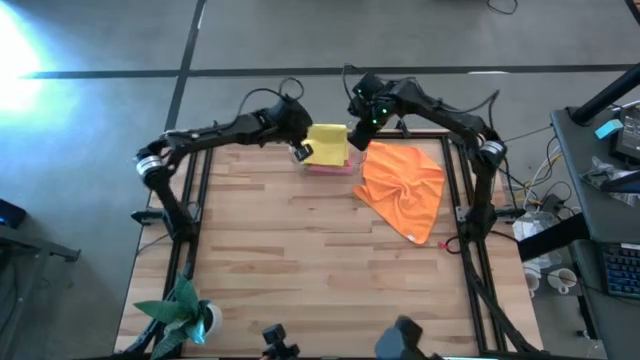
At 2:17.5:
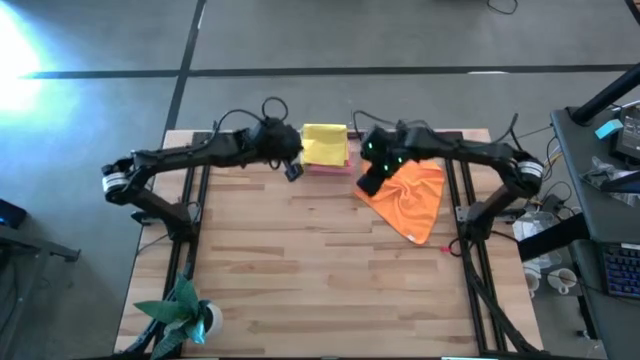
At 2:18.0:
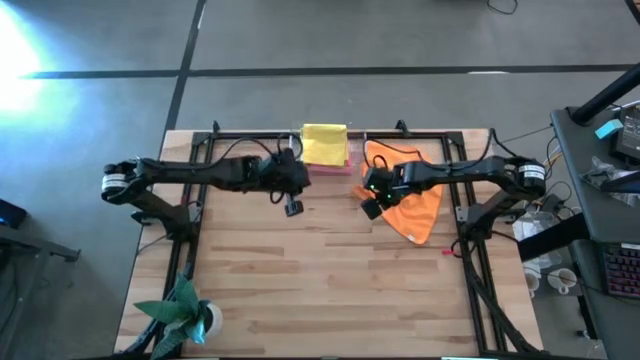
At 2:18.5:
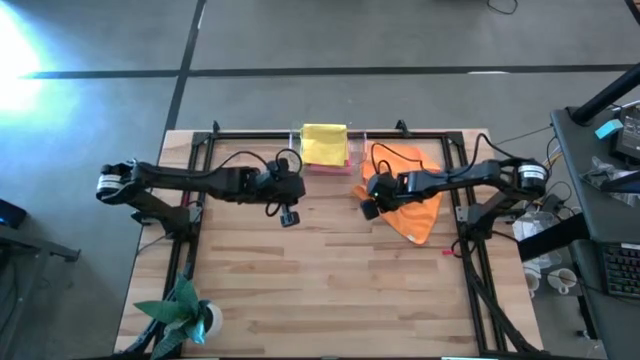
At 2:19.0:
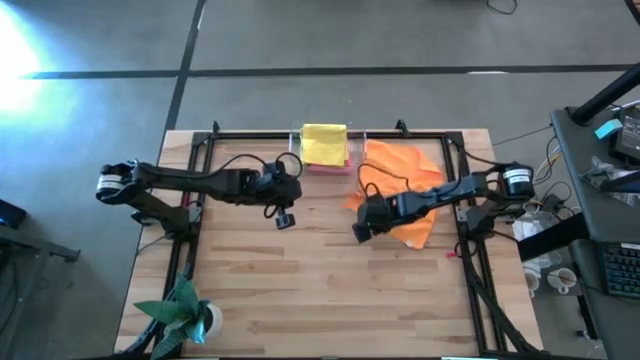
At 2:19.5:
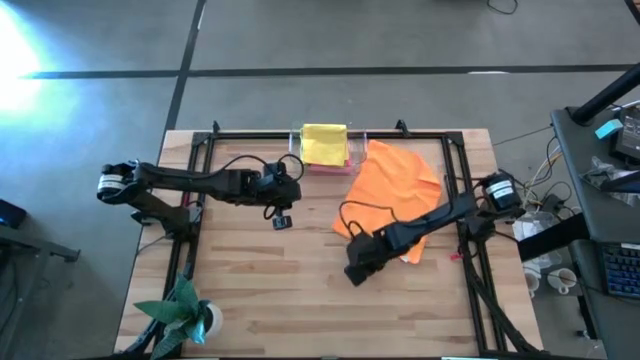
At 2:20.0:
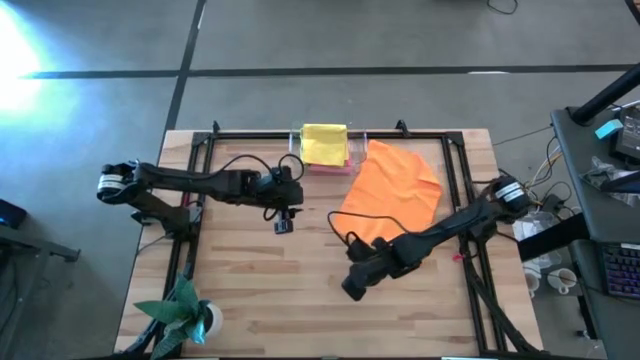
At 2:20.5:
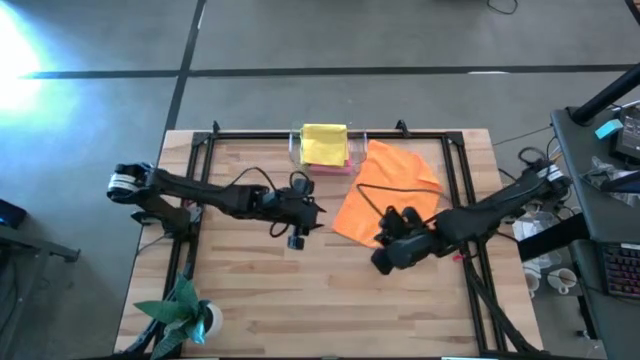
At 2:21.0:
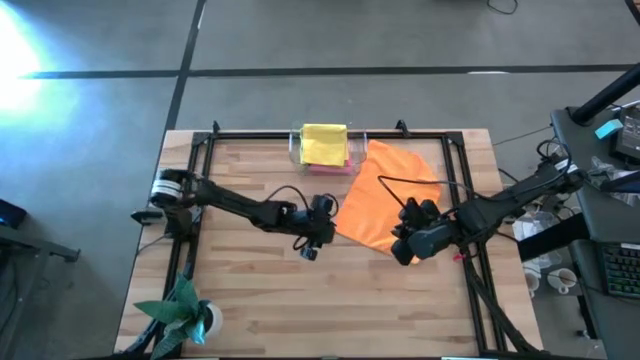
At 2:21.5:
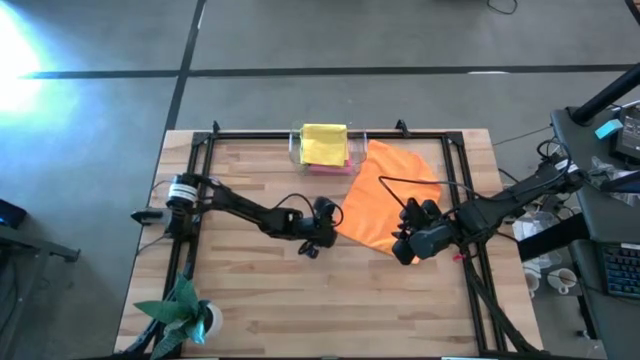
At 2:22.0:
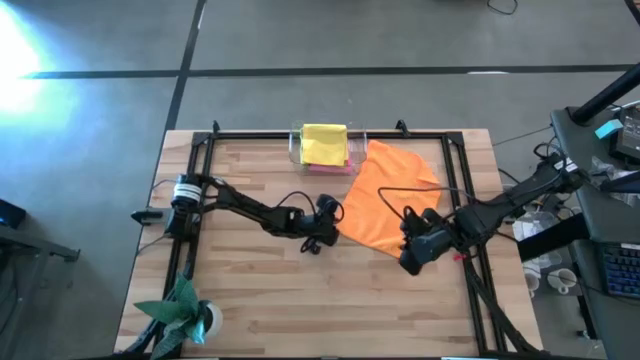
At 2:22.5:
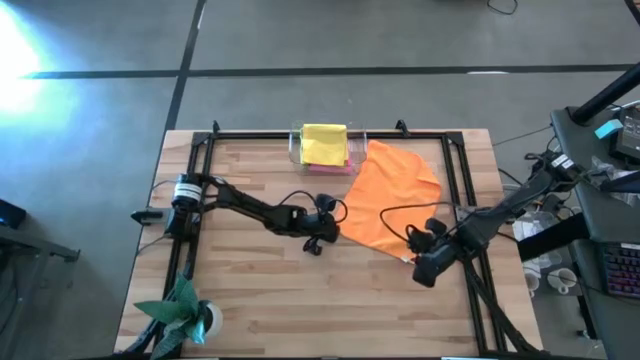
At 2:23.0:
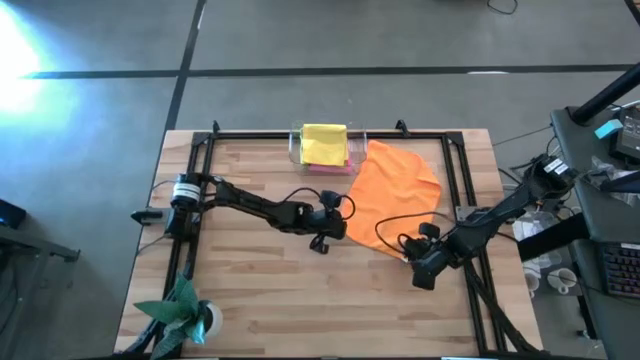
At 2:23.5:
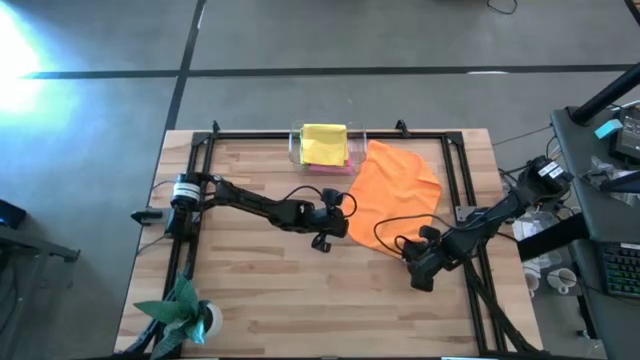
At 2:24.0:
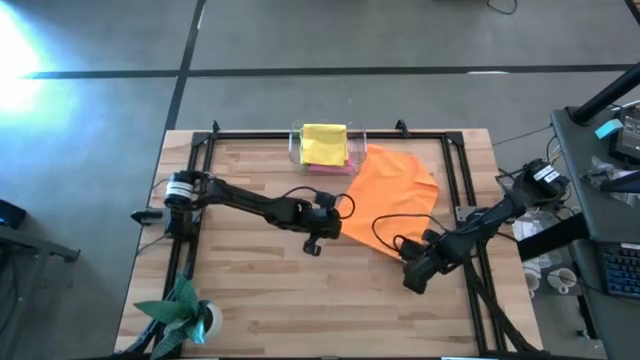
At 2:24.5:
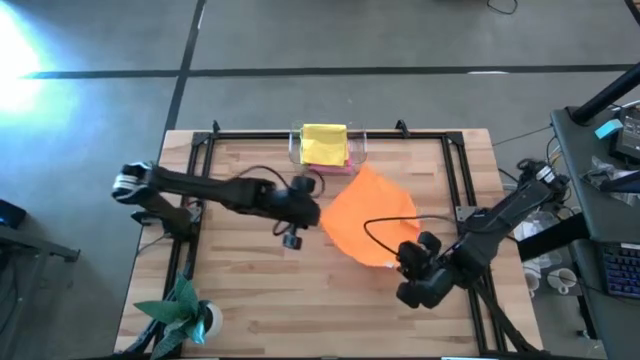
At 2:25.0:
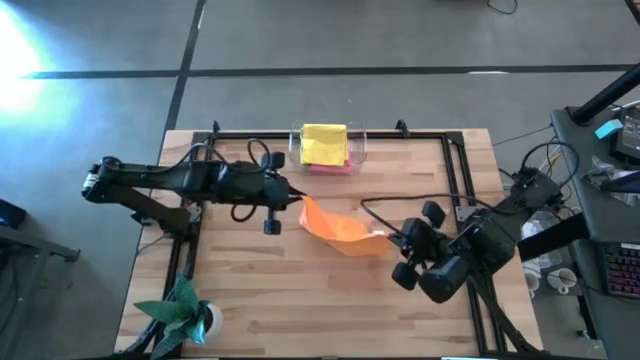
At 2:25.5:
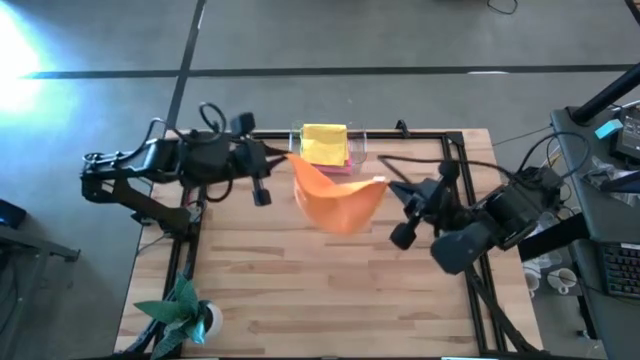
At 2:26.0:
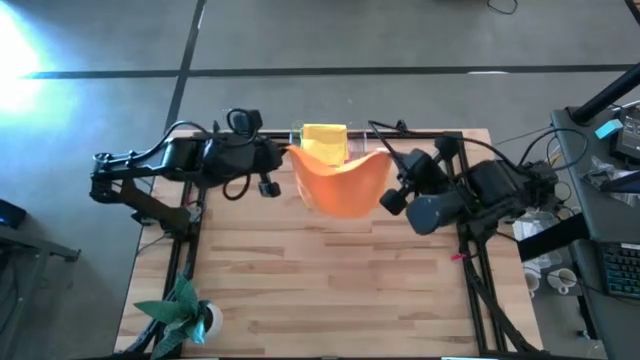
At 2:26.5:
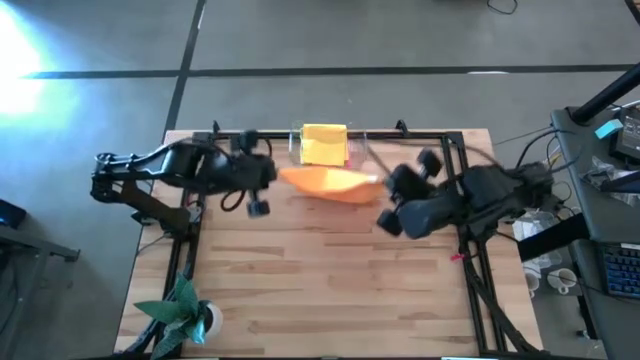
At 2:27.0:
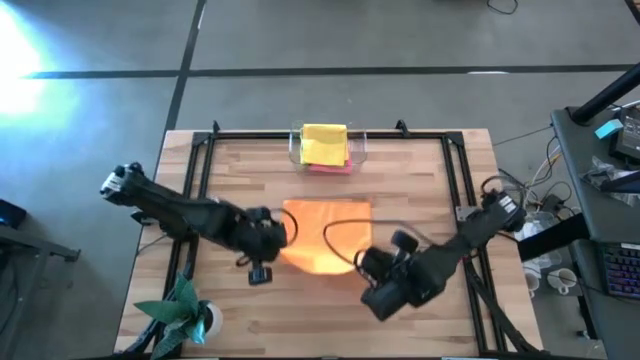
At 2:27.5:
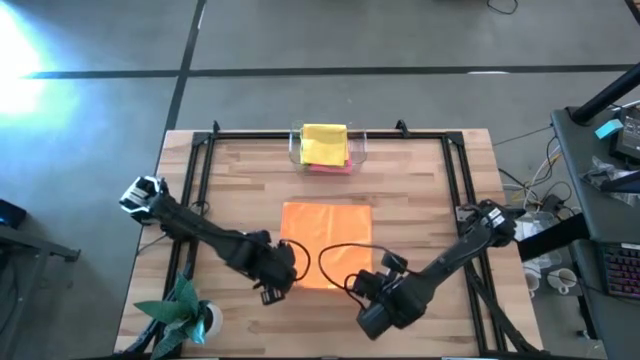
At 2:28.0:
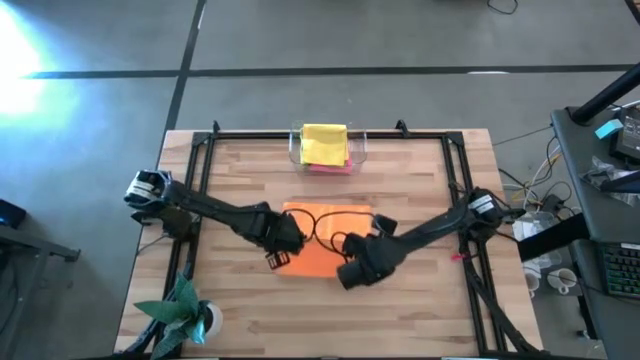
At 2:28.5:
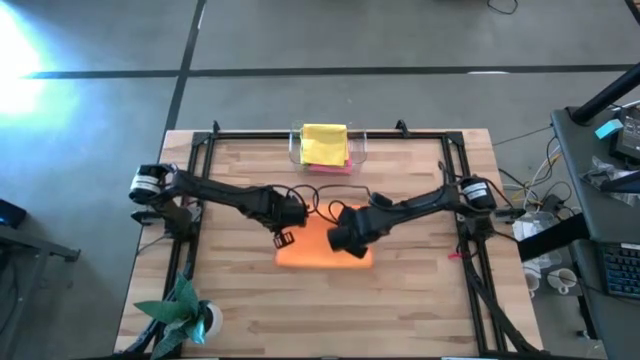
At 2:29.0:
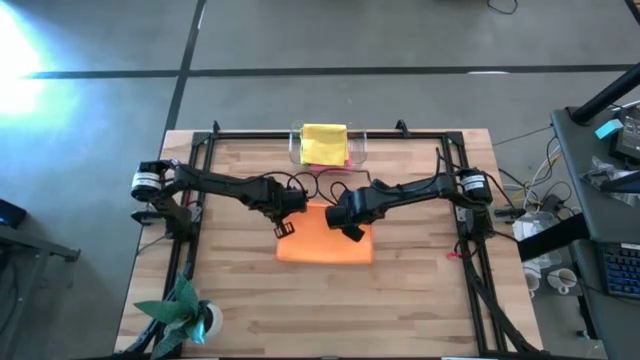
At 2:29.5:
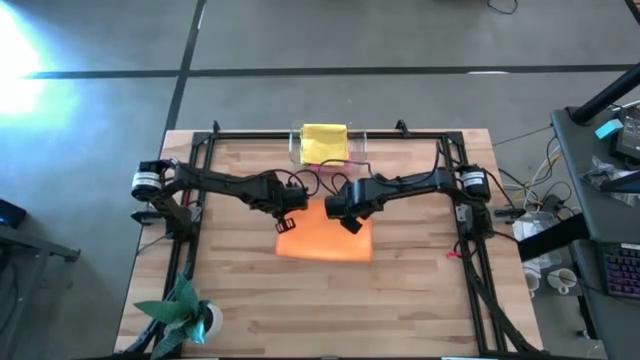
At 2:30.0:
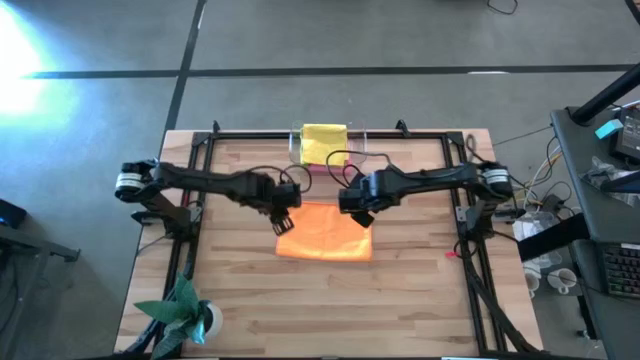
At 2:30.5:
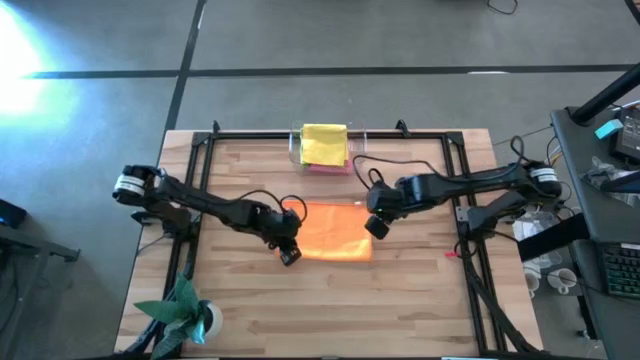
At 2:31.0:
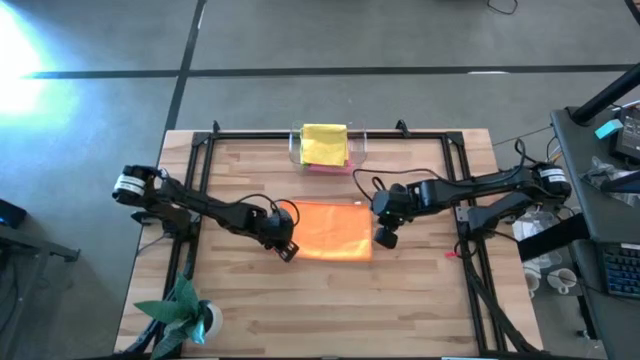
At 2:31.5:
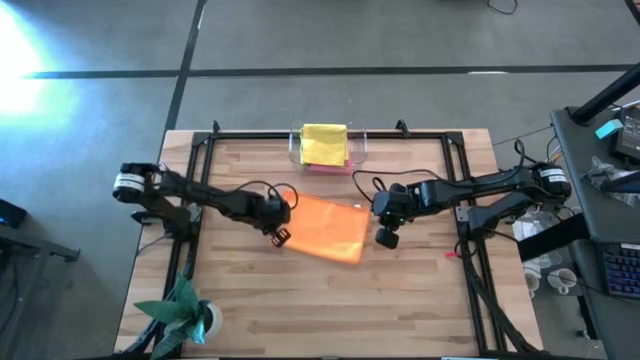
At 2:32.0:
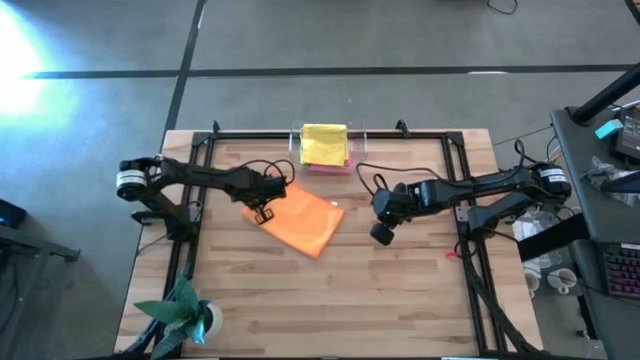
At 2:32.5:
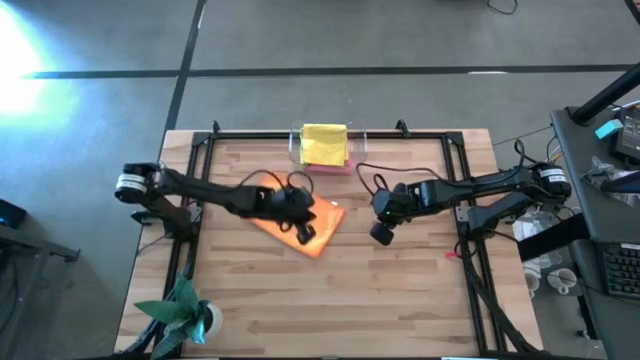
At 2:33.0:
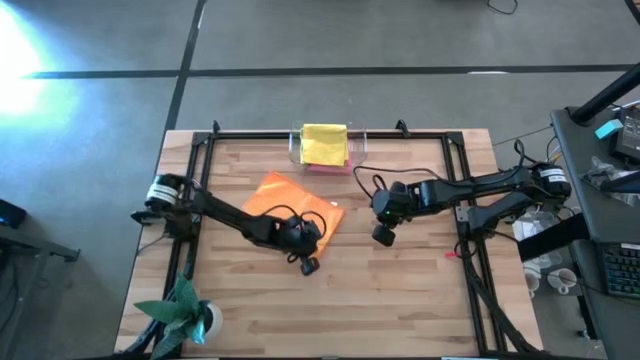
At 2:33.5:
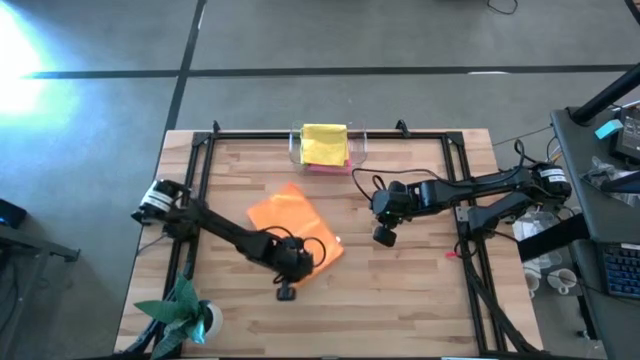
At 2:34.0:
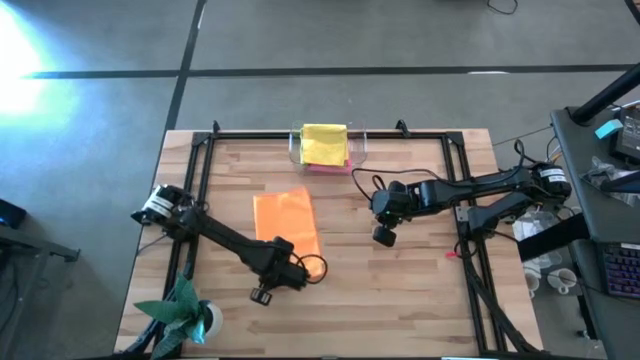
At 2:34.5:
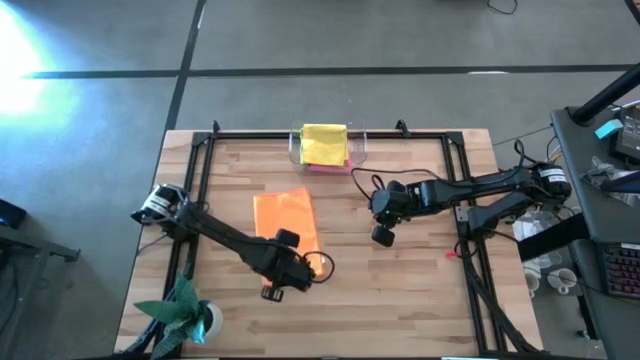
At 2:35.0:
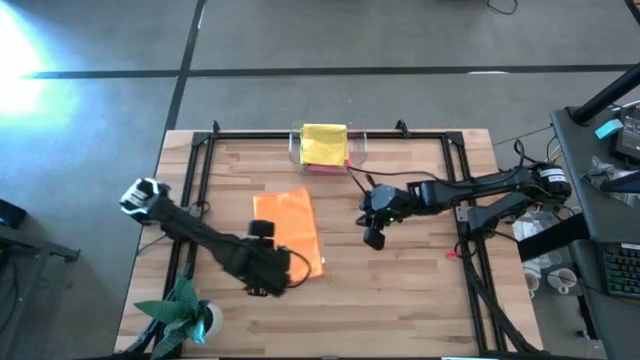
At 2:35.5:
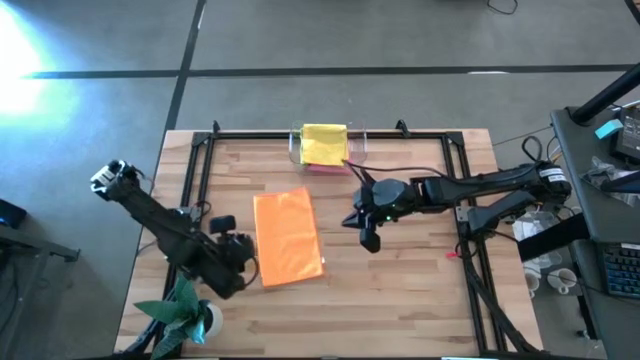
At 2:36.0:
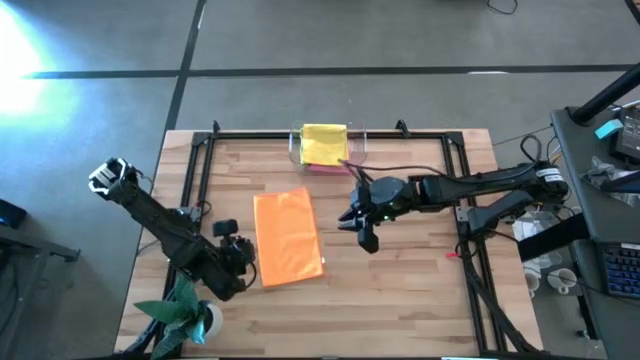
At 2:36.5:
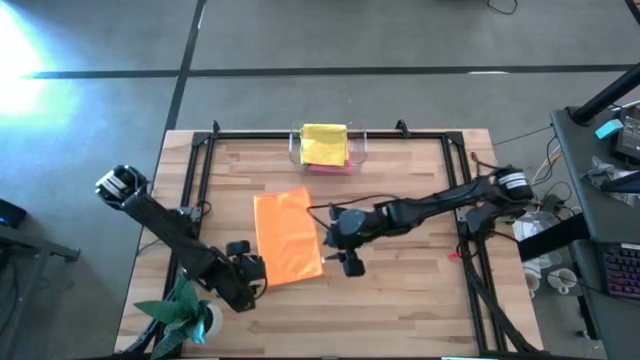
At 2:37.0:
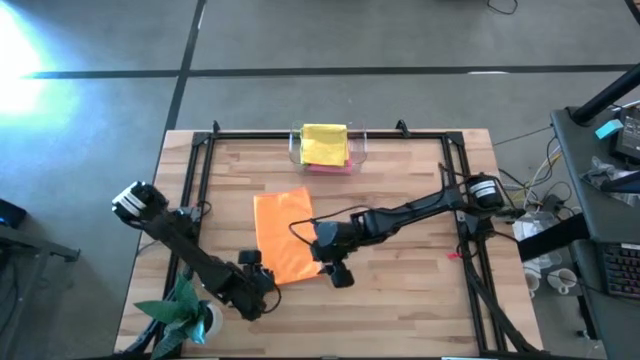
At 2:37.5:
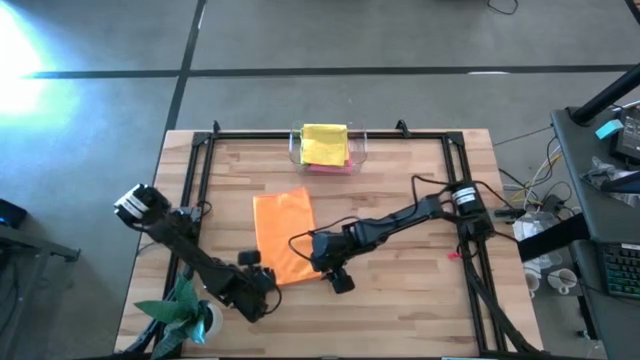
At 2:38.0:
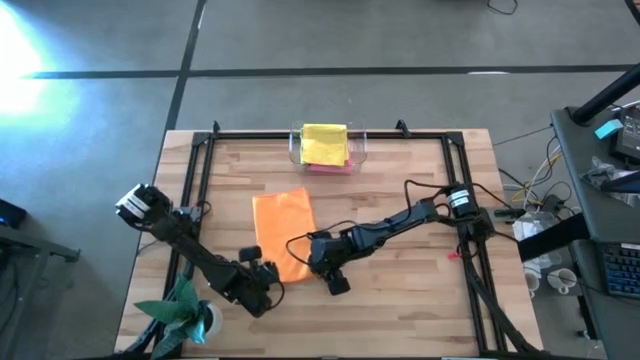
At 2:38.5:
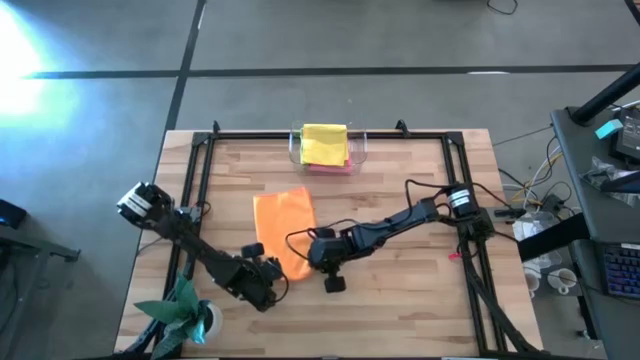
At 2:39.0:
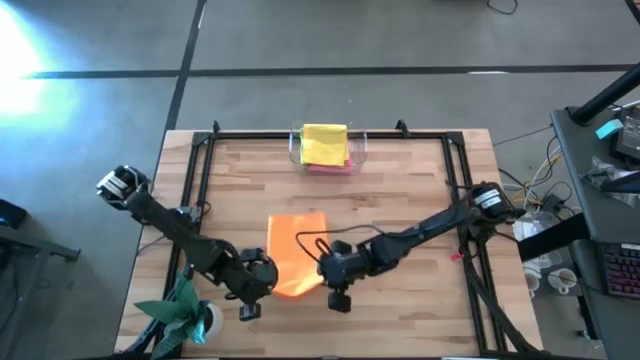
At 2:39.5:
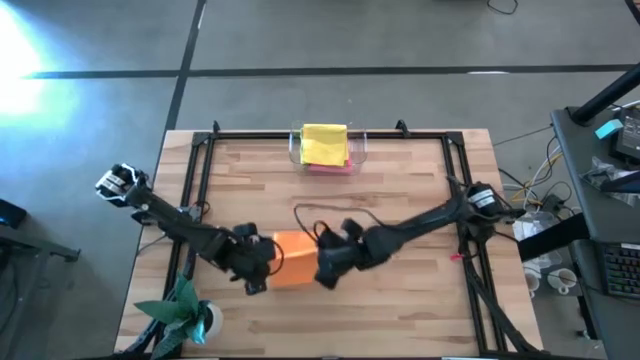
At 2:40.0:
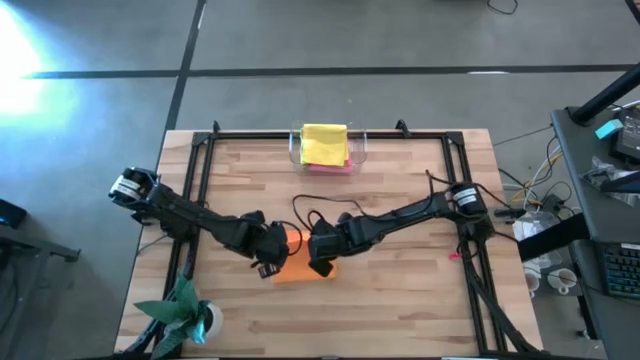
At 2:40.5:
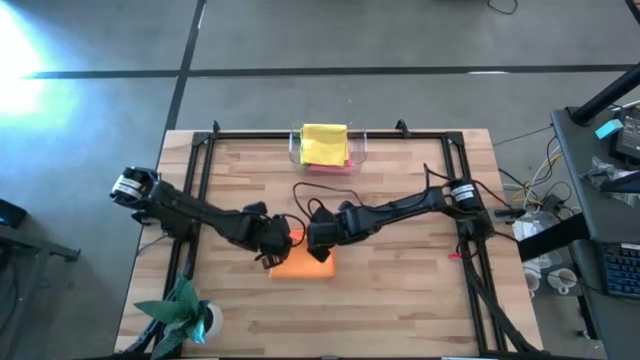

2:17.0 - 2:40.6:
Task: Fold microfiber towels
Fold the orange microfiber towel
